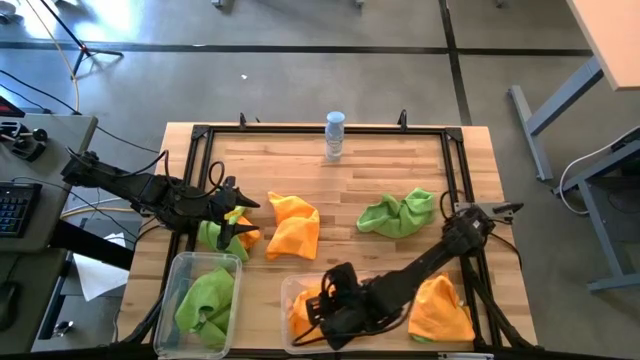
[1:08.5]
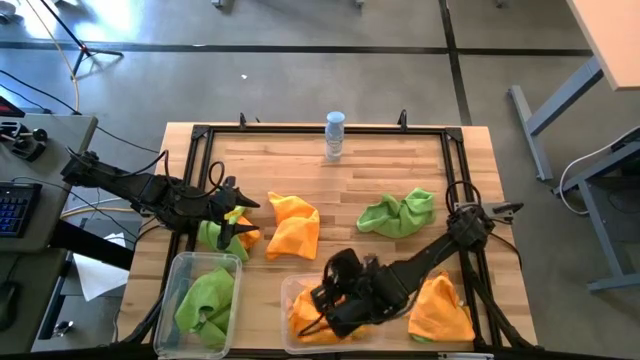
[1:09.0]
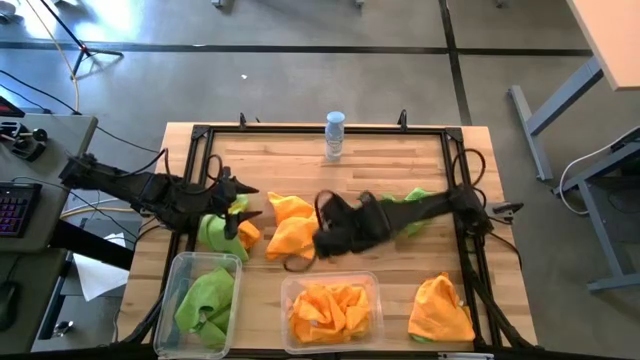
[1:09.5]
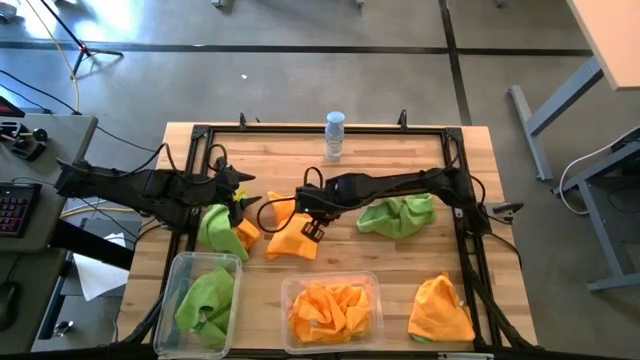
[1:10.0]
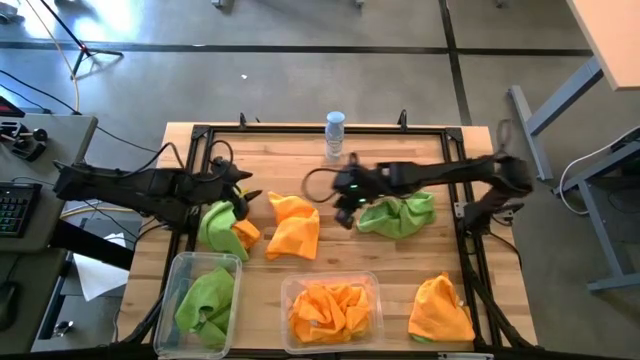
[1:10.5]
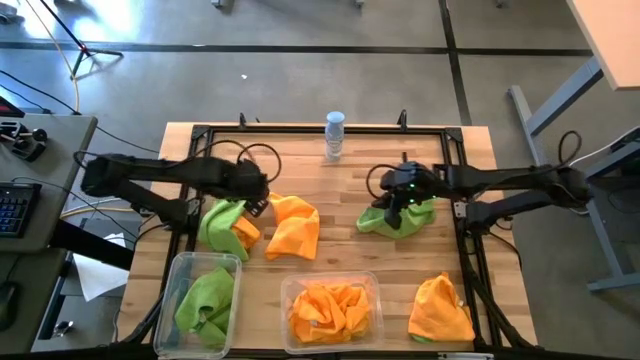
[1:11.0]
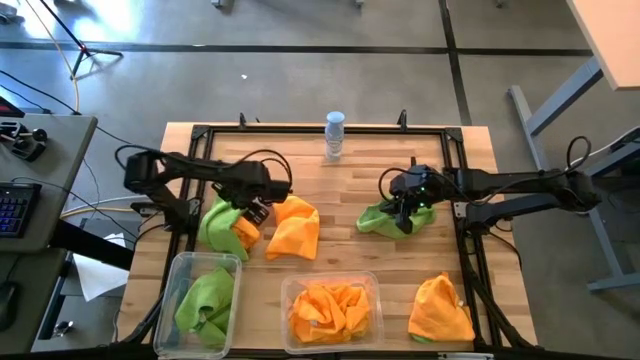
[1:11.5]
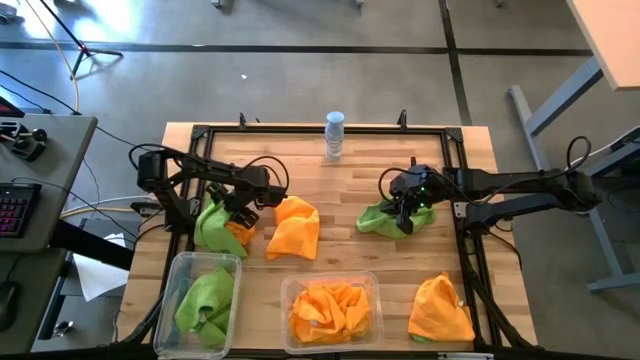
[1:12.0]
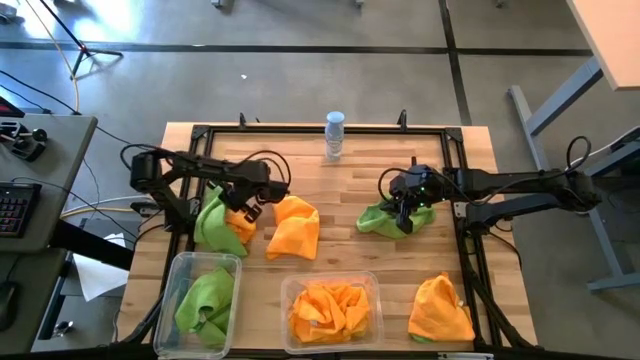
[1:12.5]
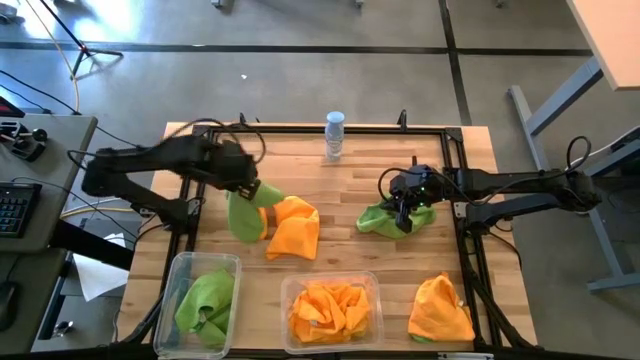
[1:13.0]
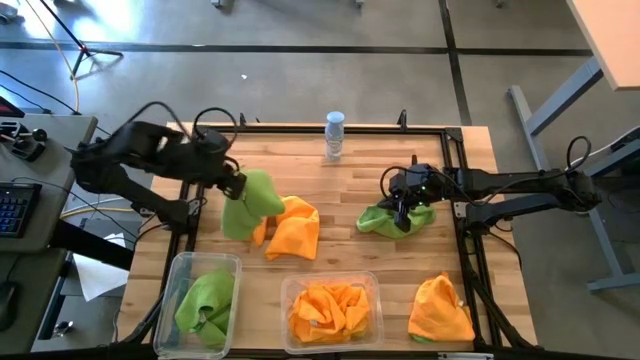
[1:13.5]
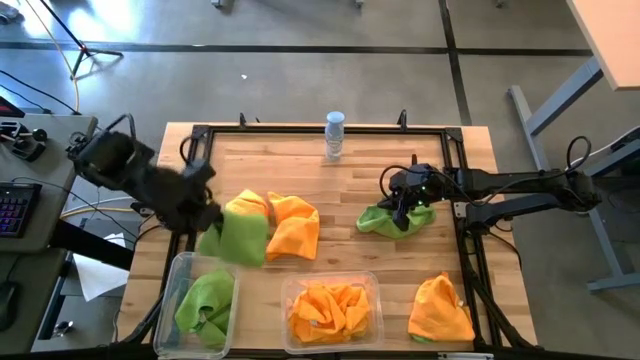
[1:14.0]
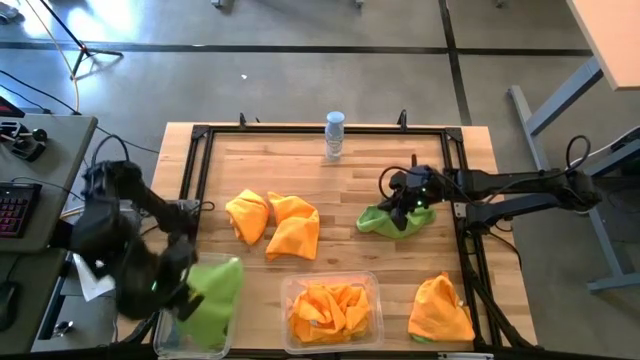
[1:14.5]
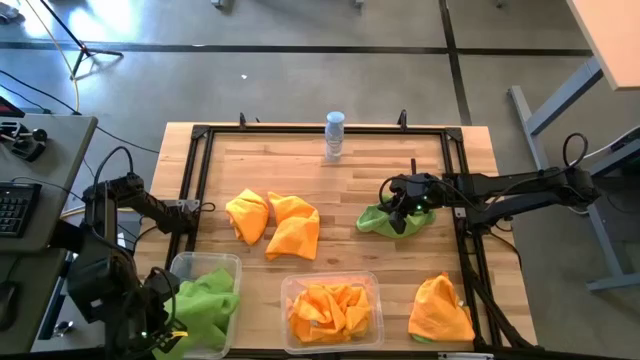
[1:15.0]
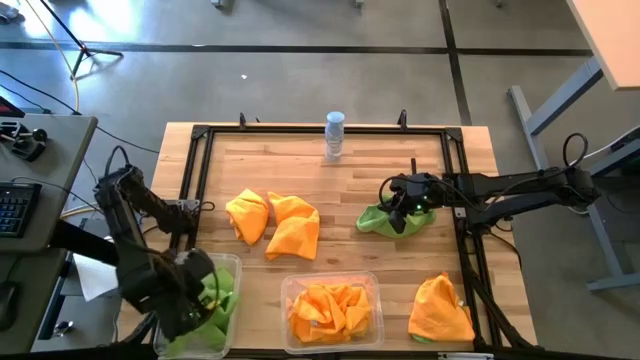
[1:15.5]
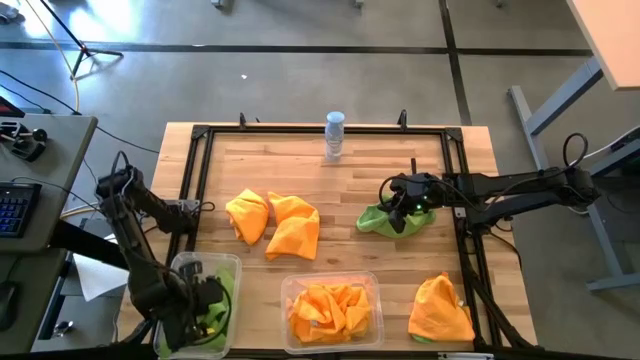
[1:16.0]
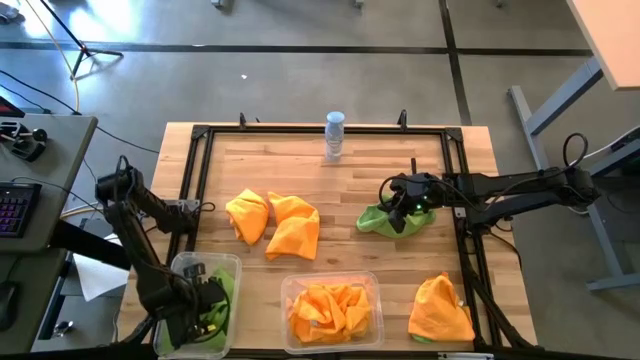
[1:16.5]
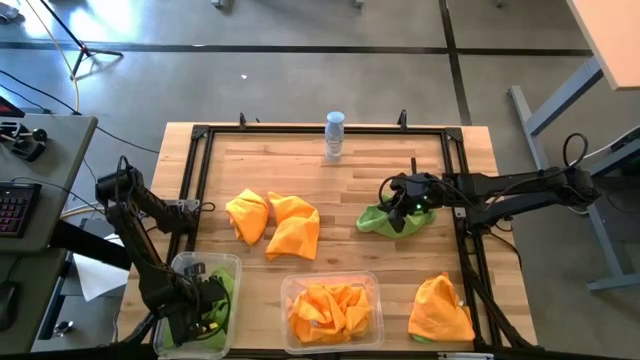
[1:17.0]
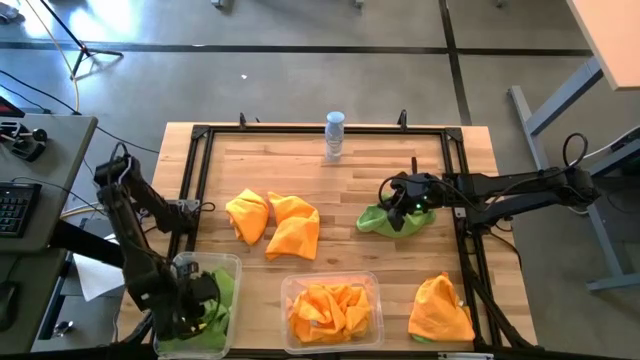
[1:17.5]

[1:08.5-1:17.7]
Task: Sort microfiber towel by color & place in baskets
Put the green microfiber towel into the left transparent bin

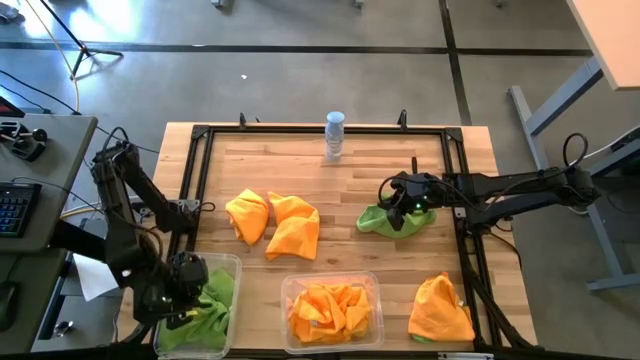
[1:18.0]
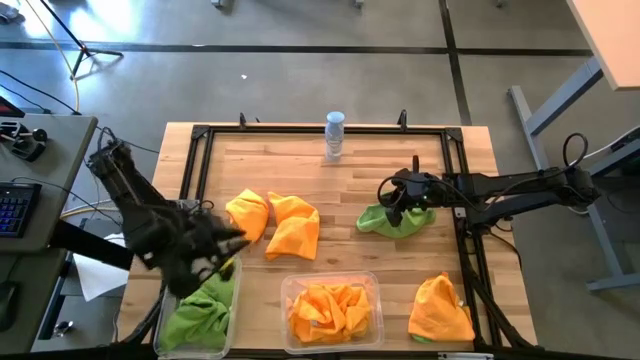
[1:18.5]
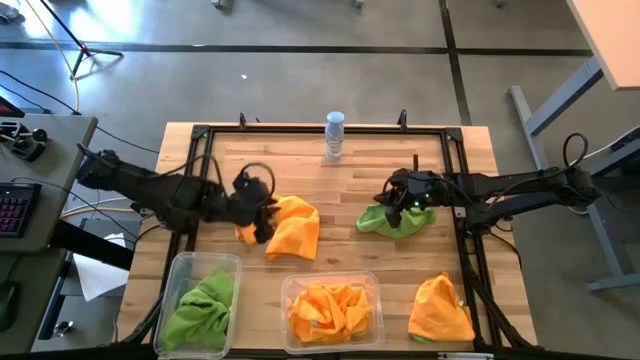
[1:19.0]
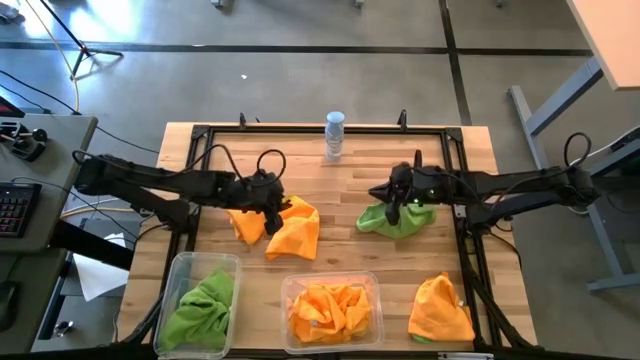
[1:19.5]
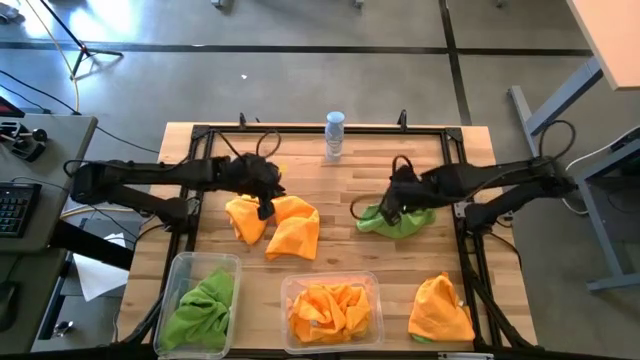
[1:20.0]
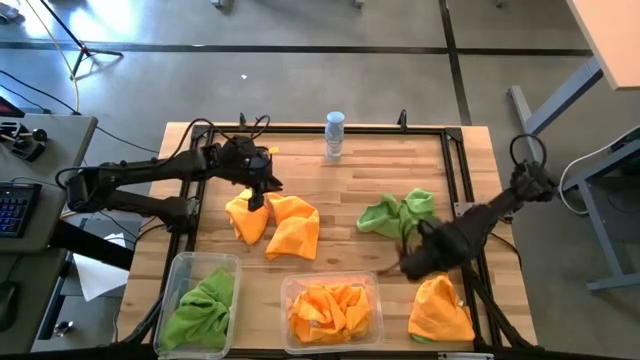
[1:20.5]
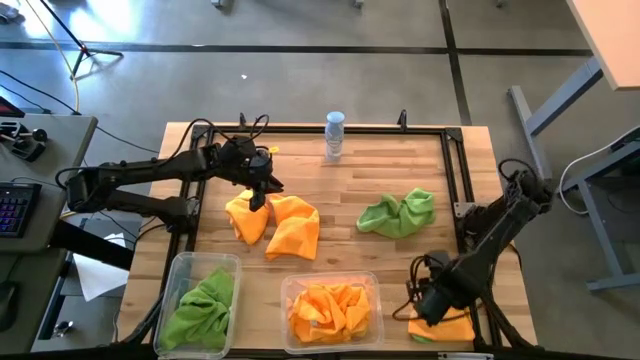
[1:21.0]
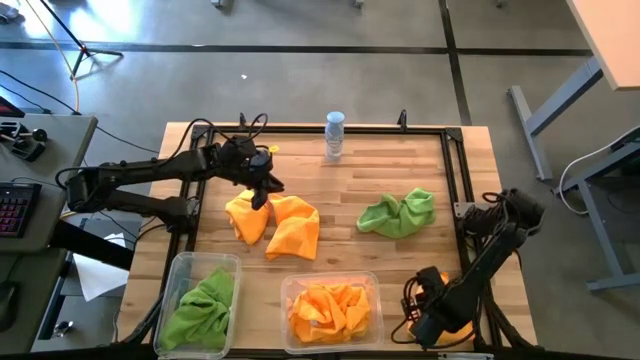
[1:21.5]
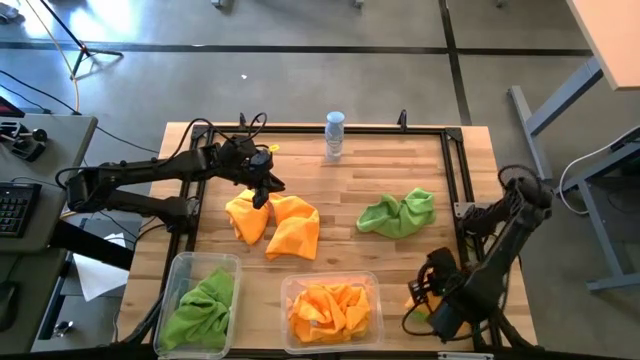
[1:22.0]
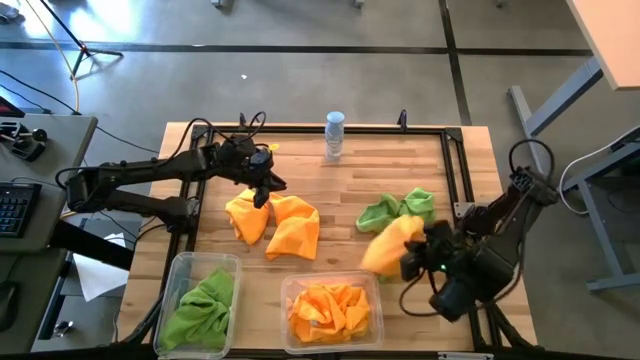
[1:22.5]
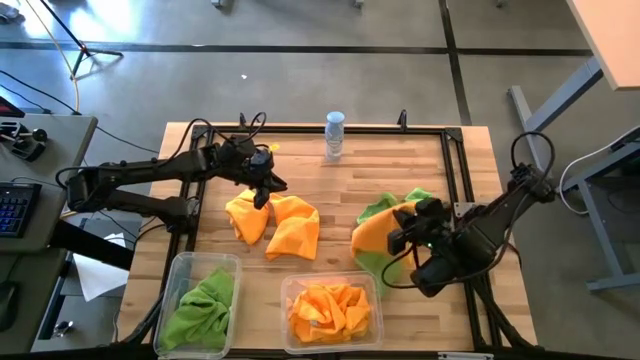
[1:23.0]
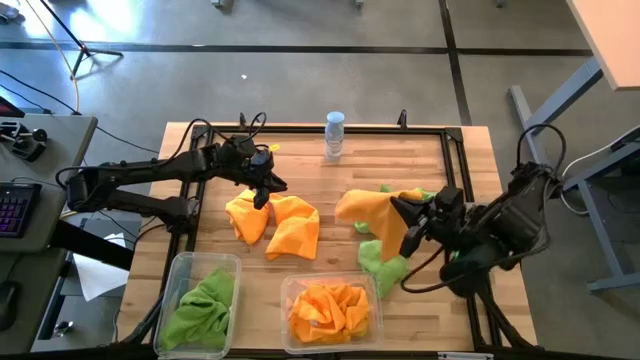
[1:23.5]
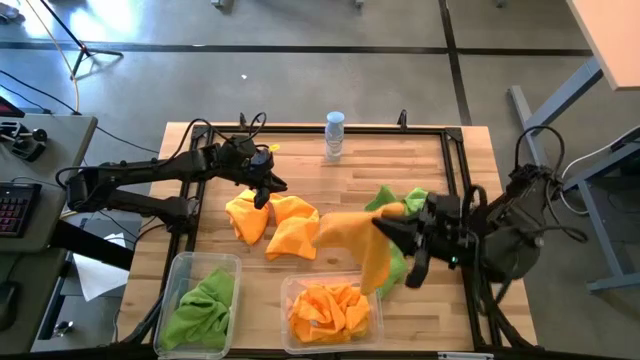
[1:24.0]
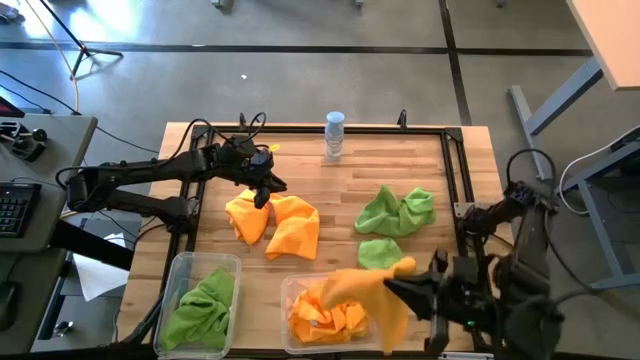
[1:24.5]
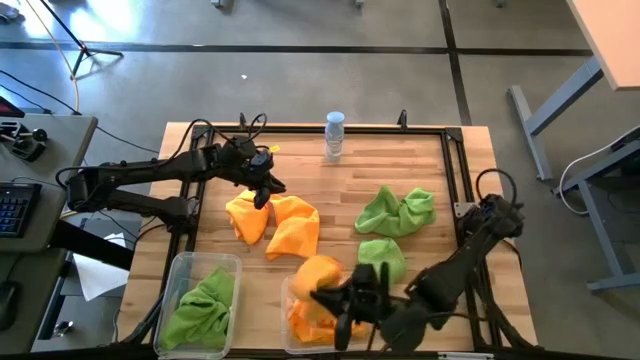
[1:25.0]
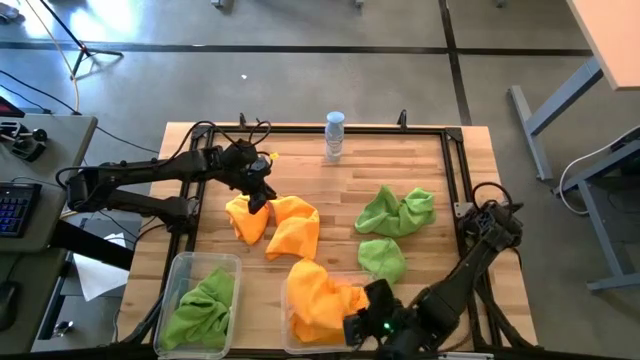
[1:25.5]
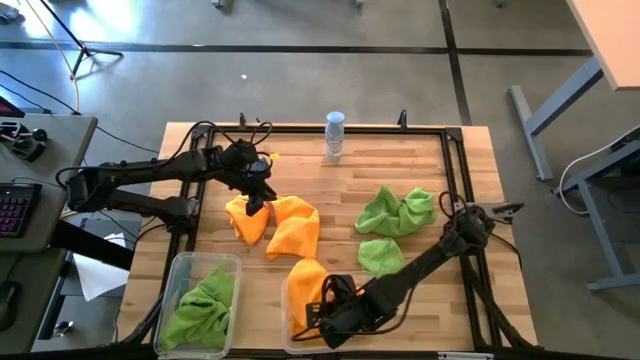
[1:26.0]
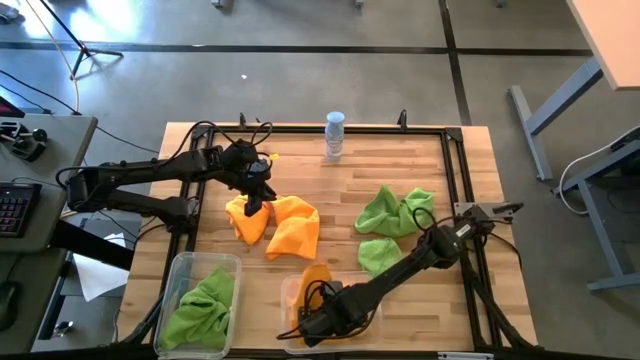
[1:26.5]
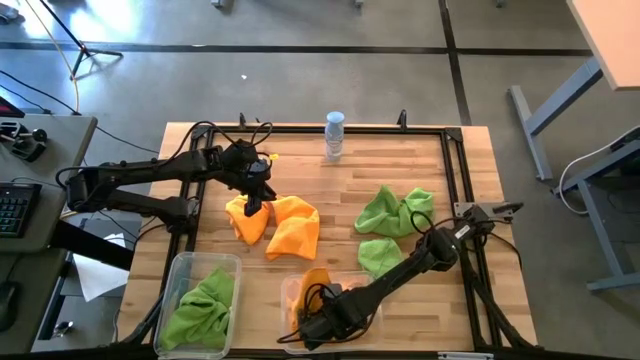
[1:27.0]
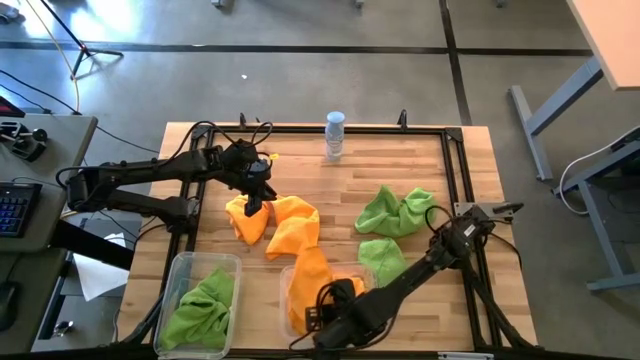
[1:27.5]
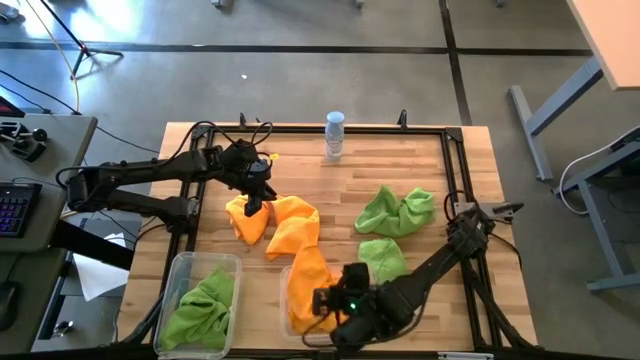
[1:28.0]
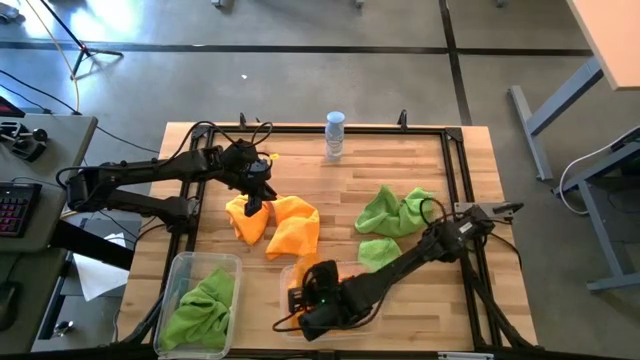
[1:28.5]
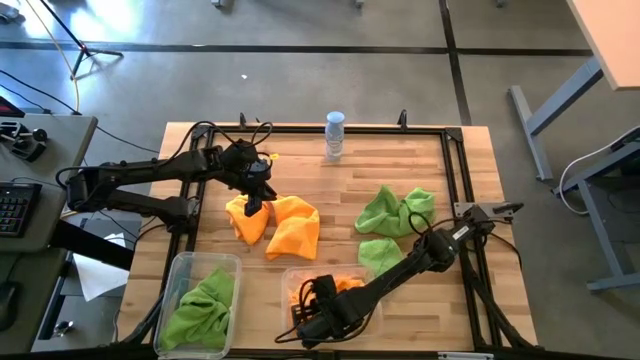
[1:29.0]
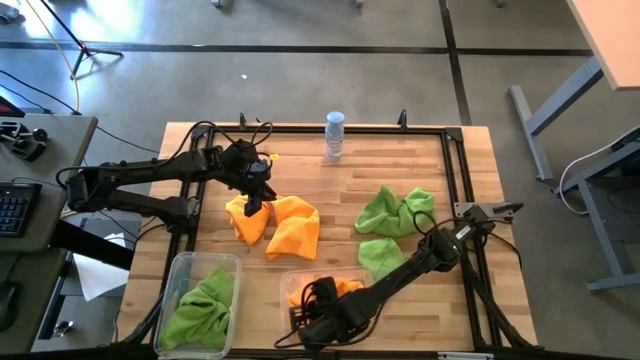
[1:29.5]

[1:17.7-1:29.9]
Put the orange microfiber towel into the right transparent bin
